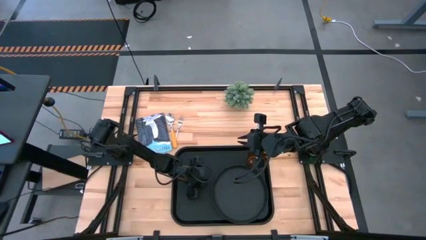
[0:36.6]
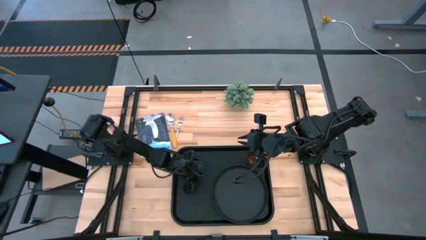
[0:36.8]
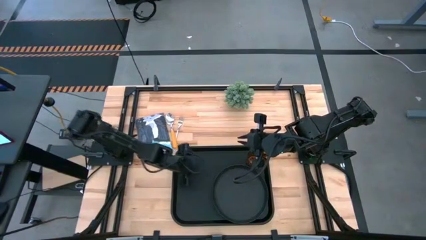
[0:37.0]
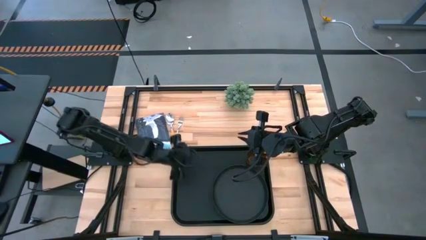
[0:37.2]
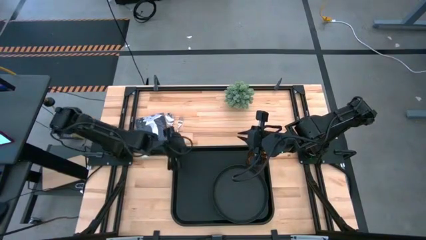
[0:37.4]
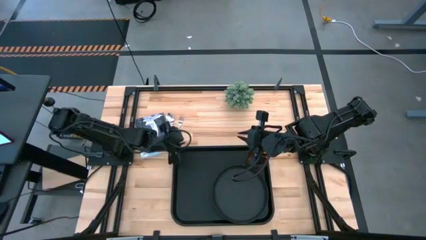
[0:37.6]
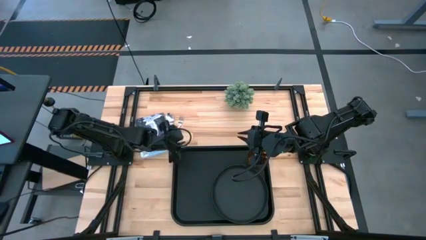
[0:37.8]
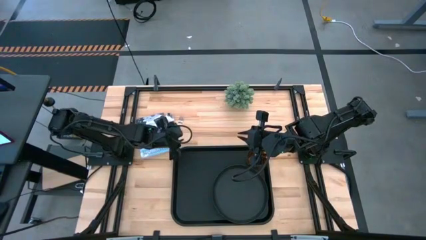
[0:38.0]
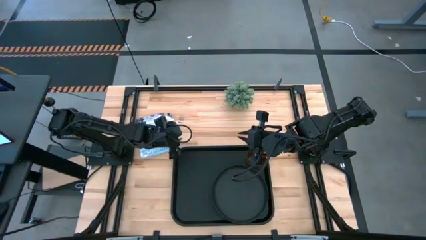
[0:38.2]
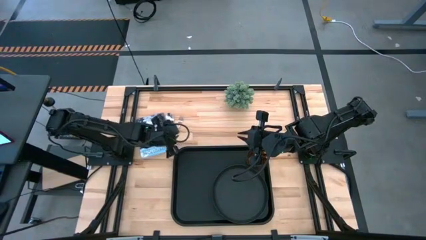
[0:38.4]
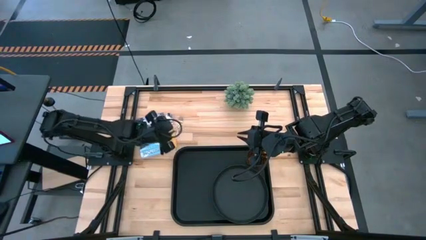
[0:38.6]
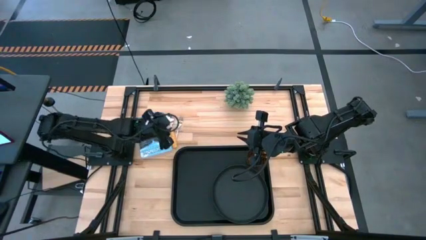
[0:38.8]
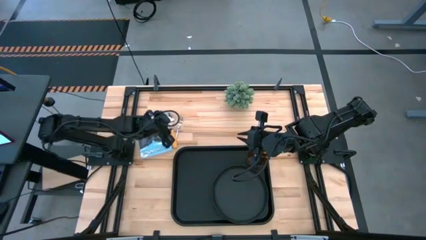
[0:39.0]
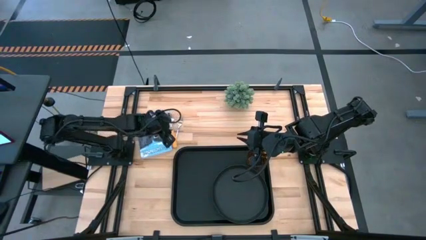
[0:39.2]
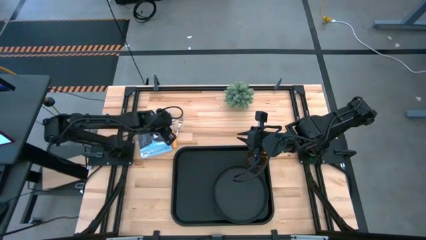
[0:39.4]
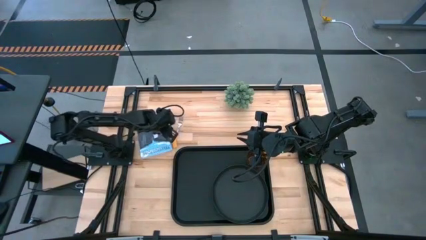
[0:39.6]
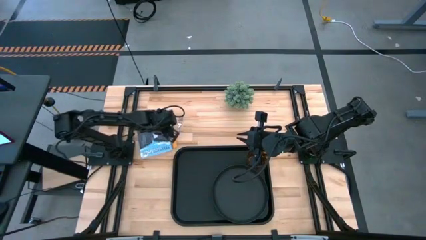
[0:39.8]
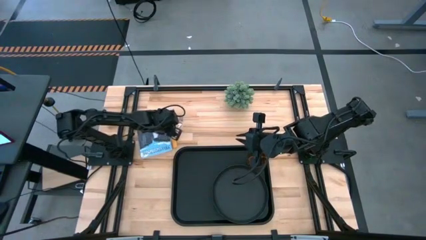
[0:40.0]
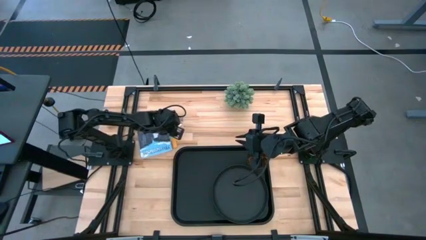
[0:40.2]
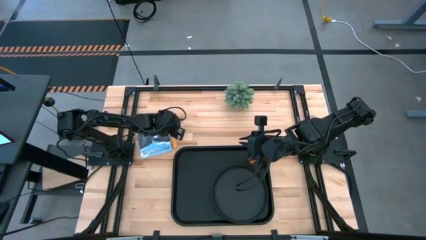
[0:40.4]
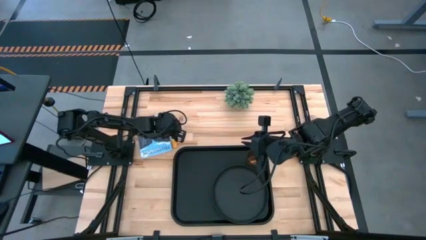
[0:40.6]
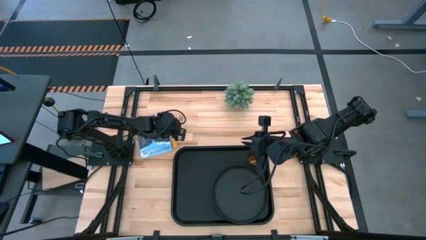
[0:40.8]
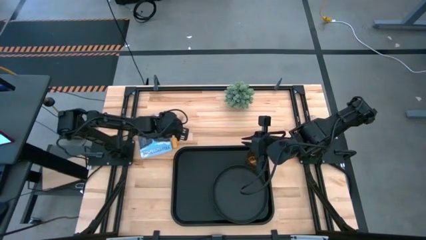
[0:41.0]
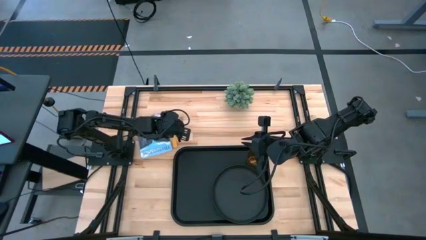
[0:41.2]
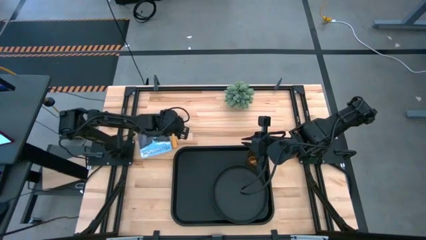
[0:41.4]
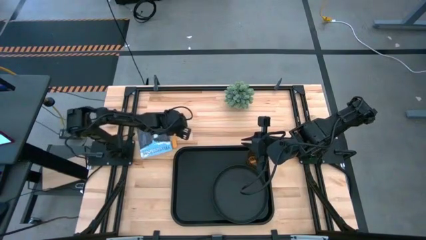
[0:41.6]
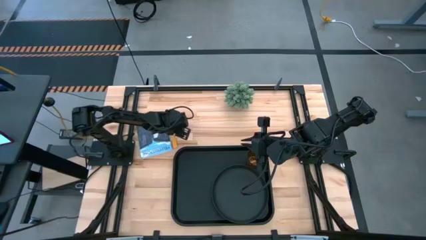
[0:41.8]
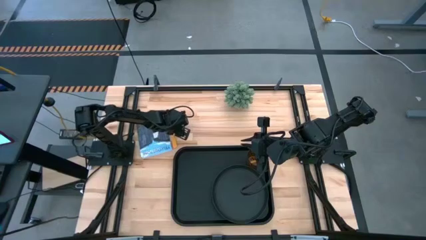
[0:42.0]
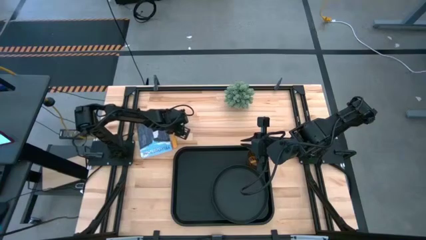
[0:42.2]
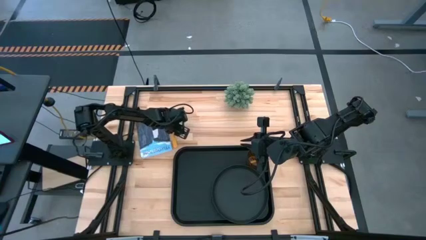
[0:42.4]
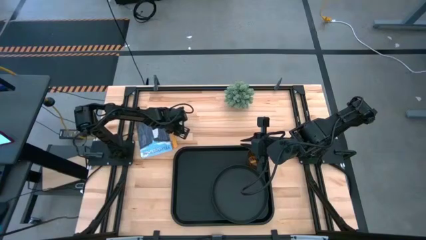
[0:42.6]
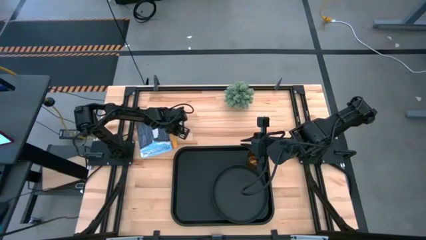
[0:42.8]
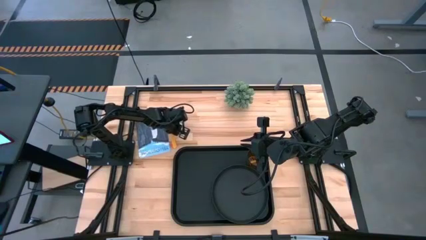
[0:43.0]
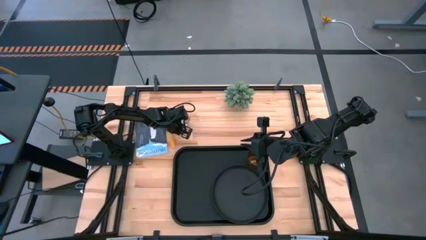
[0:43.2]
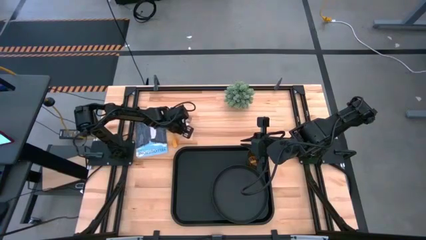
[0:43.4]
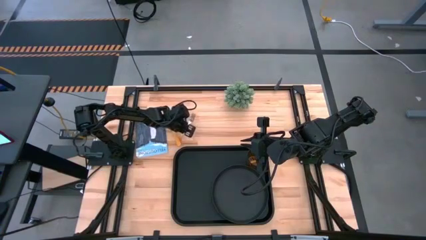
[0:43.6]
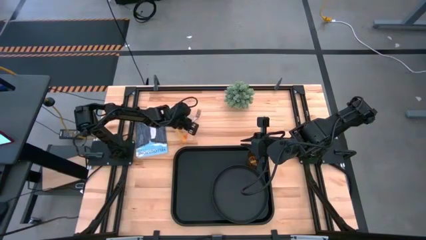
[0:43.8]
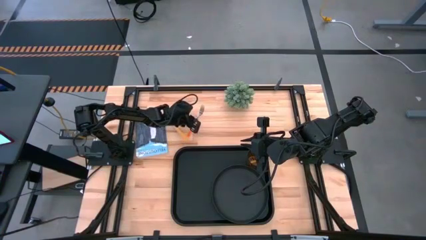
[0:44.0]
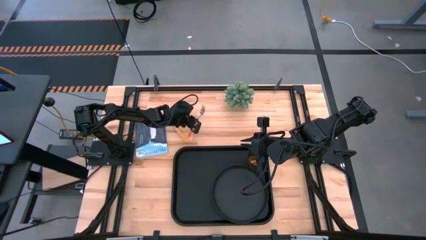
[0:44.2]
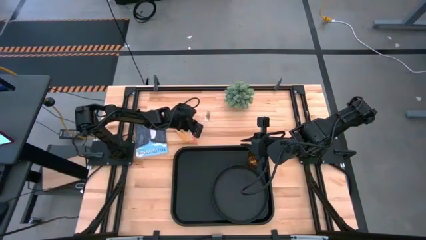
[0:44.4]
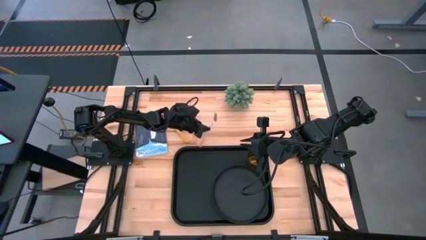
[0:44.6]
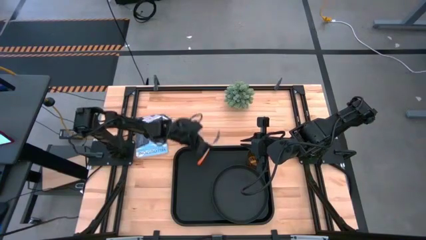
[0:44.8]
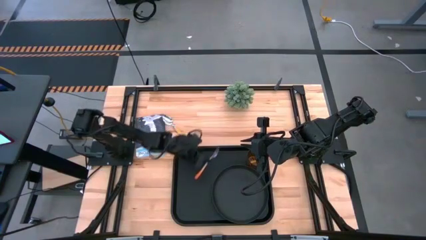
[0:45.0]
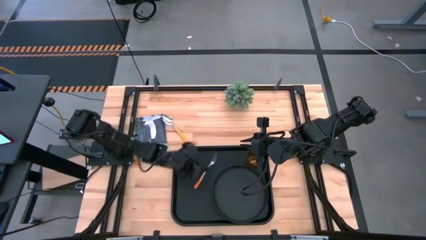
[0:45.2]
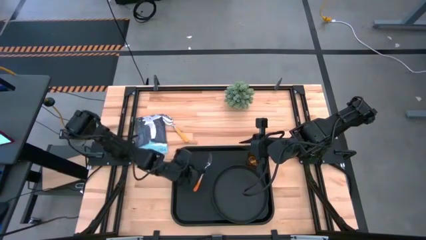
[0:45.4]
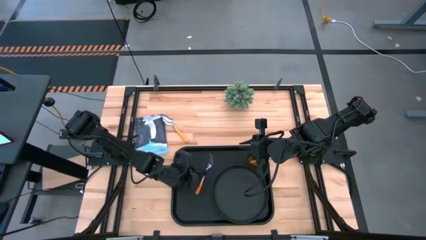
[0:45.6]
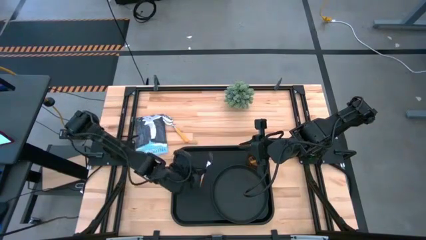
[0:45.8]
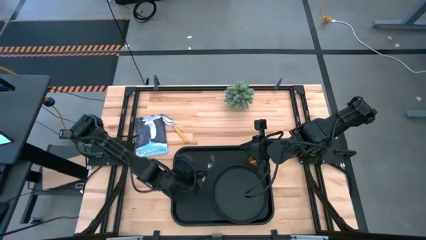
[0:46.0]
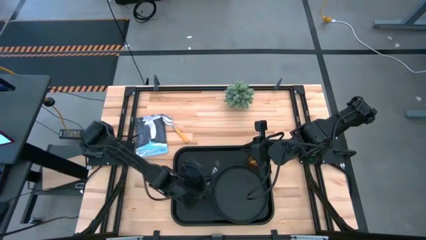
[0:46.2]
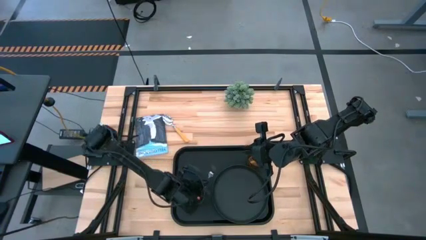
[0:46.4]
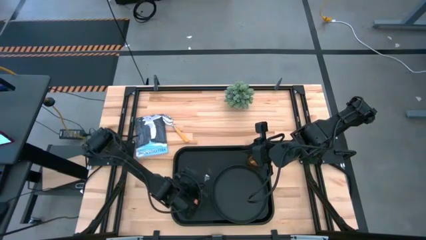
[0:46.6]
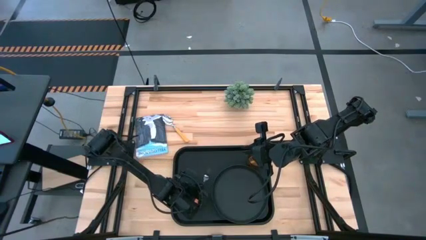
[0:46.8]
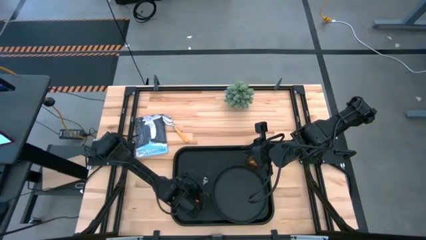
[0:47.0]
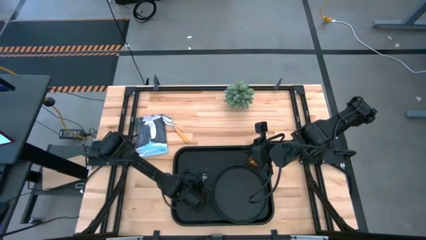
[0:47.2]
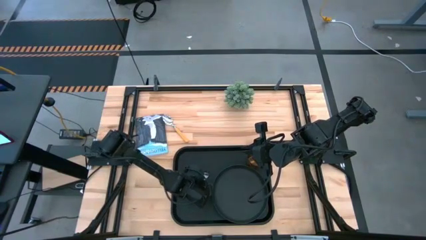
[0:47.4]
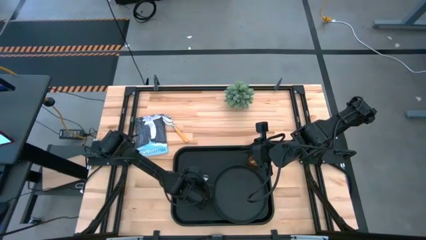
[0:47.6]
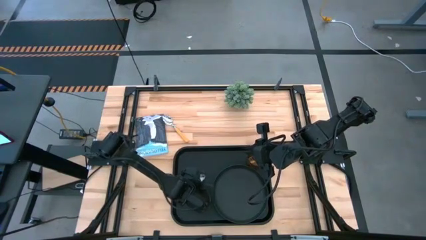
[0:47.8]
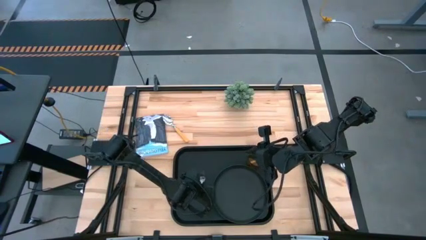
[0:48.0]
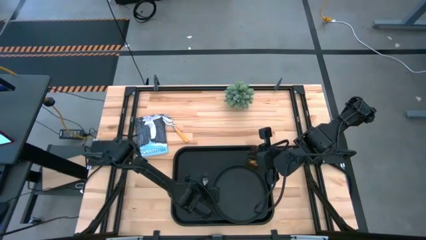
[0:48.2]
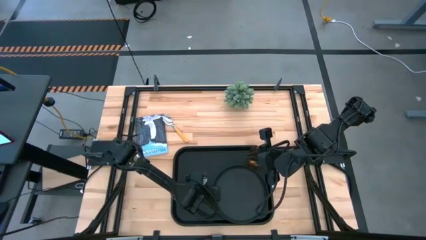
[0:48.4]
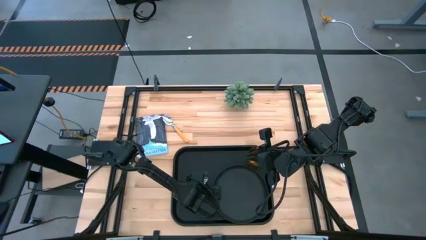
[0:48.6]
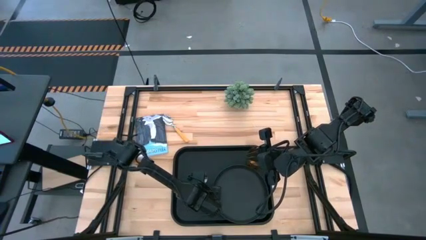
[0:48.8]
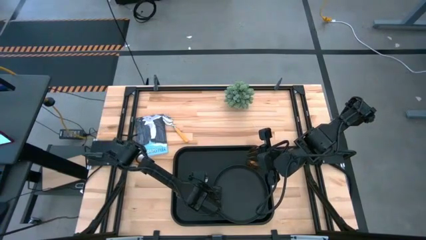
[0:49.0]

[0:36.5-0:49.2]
Task: Pick and place plate/cup/fork/spoon on tray
Put the orange fork to the left side of the black plate on the black serving tray
